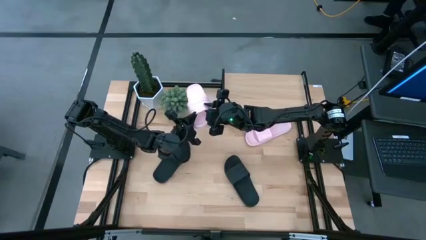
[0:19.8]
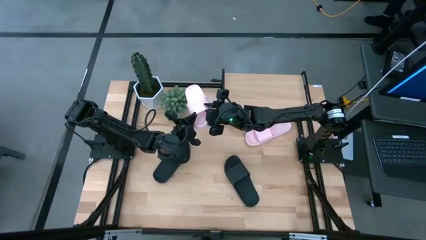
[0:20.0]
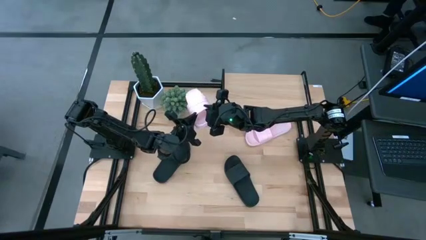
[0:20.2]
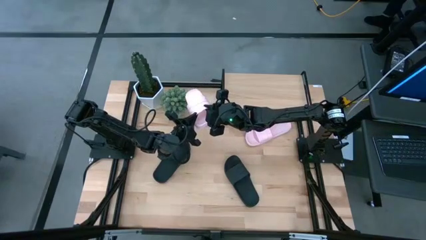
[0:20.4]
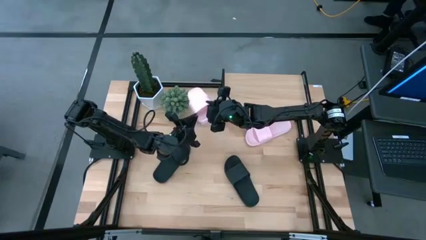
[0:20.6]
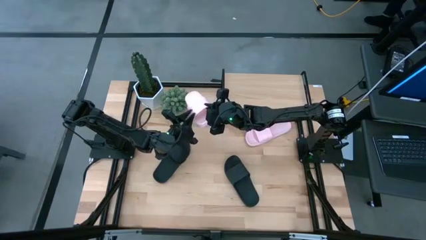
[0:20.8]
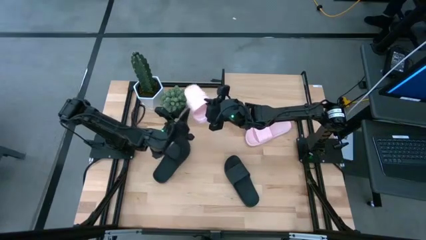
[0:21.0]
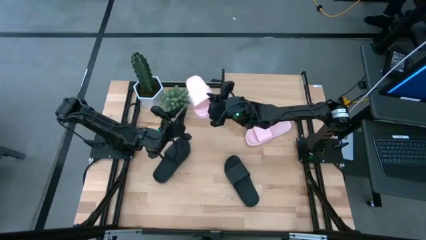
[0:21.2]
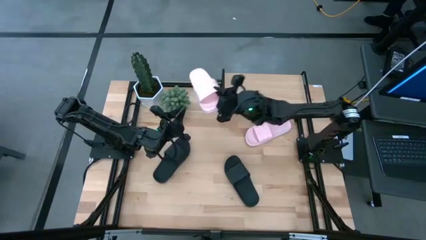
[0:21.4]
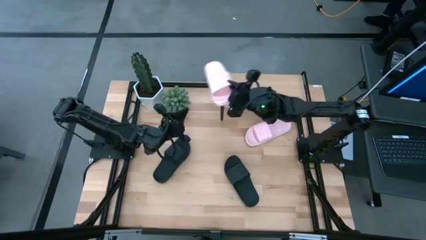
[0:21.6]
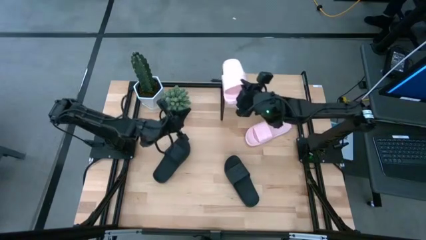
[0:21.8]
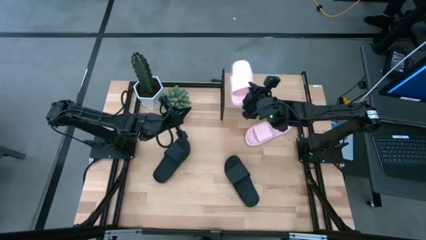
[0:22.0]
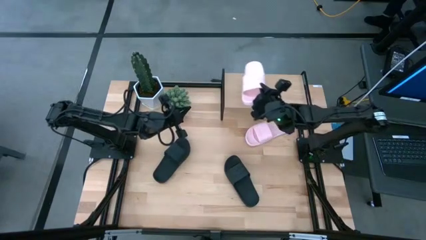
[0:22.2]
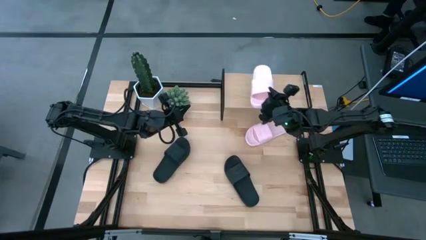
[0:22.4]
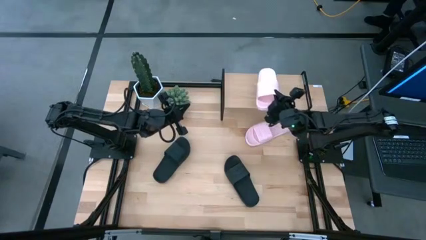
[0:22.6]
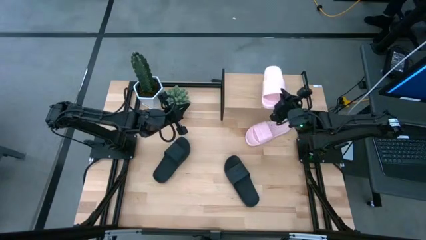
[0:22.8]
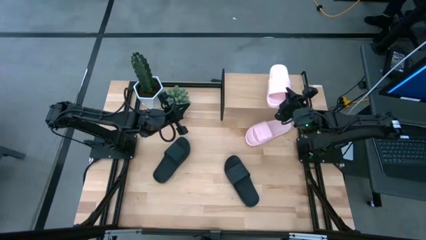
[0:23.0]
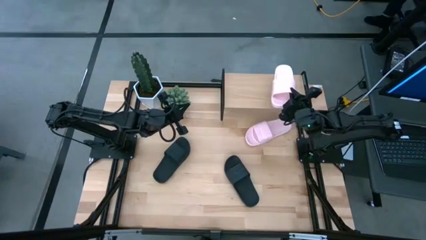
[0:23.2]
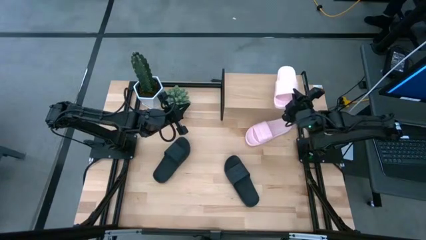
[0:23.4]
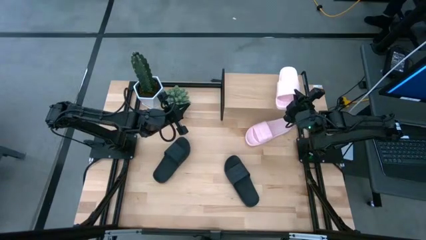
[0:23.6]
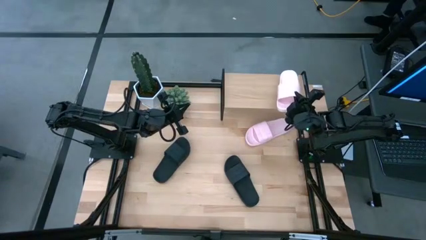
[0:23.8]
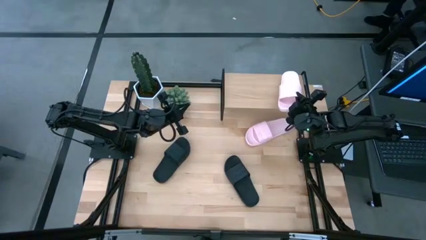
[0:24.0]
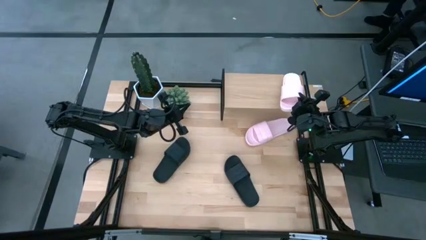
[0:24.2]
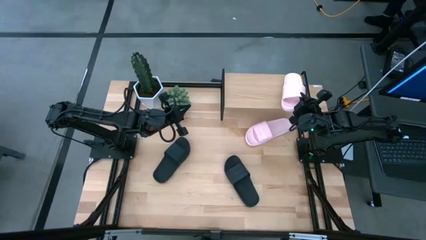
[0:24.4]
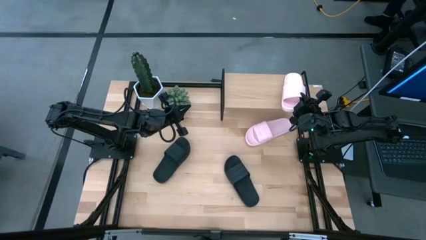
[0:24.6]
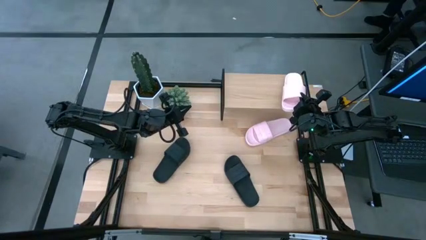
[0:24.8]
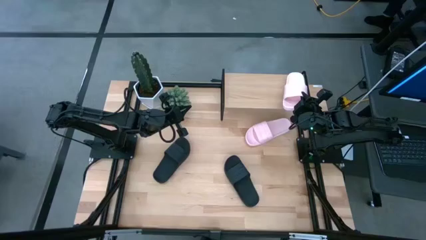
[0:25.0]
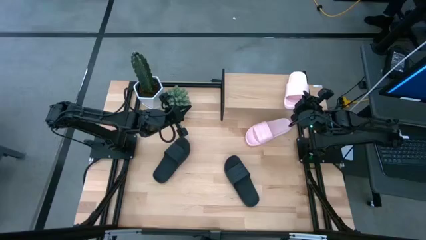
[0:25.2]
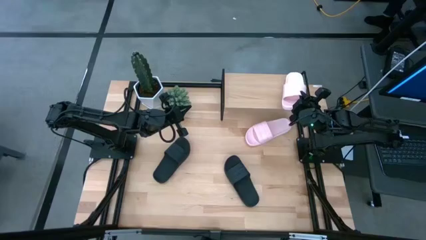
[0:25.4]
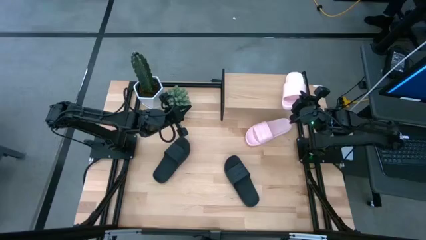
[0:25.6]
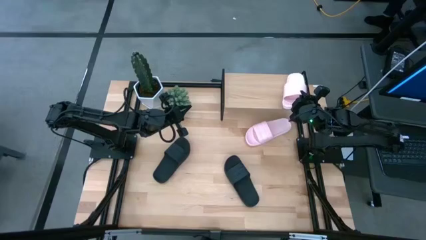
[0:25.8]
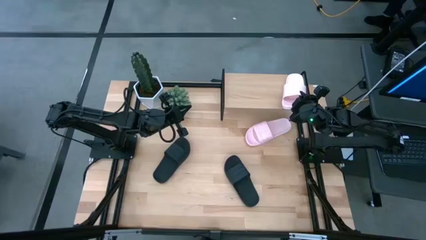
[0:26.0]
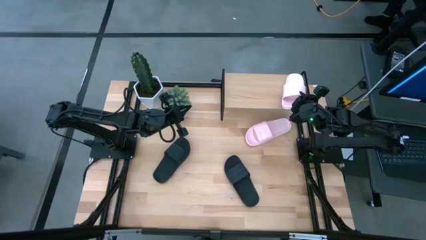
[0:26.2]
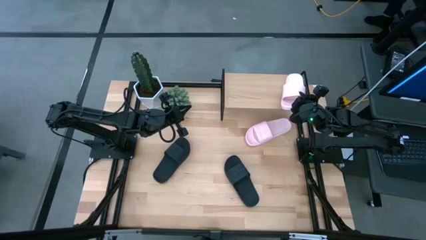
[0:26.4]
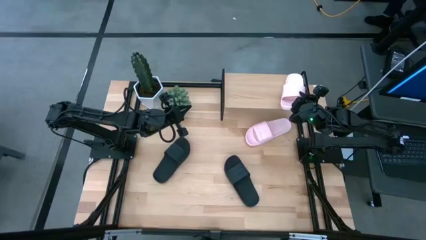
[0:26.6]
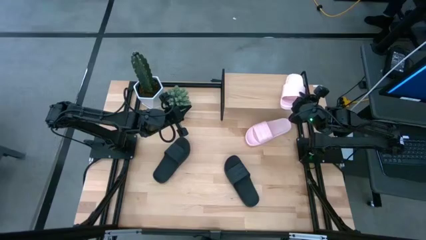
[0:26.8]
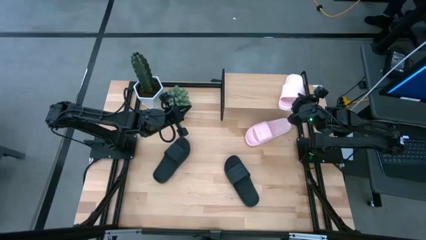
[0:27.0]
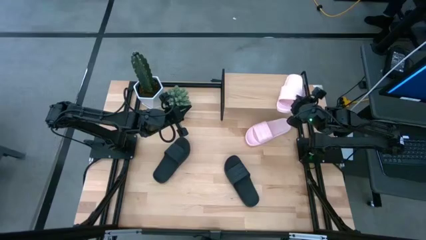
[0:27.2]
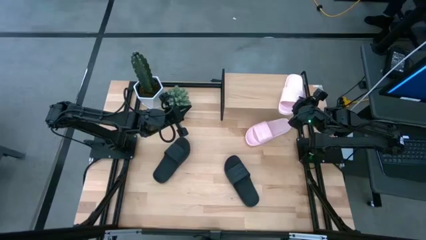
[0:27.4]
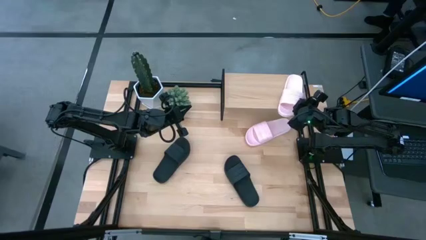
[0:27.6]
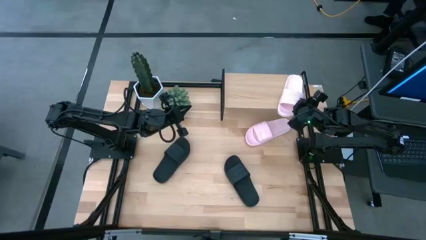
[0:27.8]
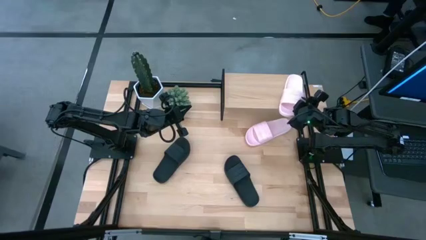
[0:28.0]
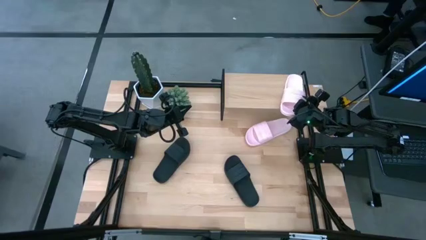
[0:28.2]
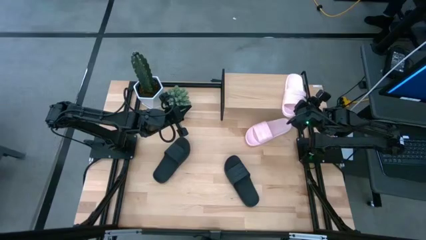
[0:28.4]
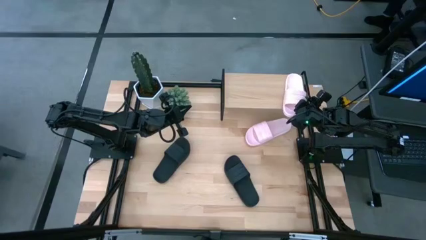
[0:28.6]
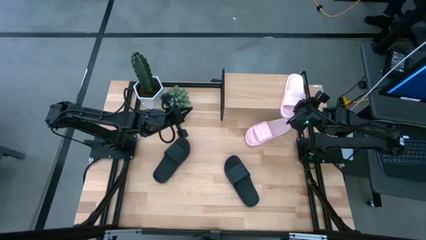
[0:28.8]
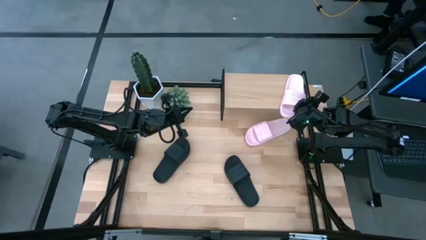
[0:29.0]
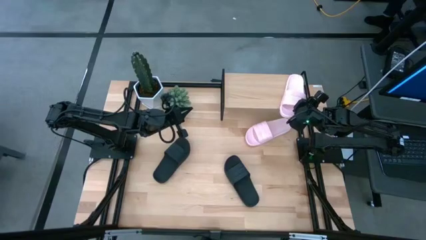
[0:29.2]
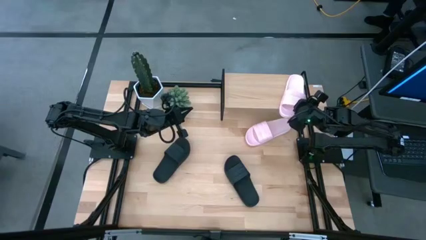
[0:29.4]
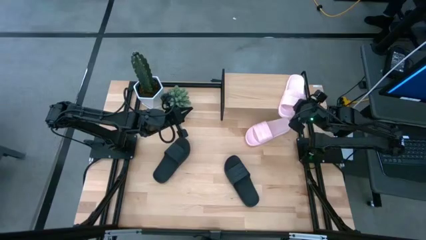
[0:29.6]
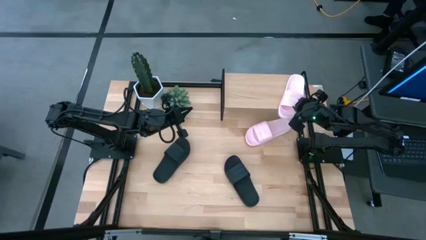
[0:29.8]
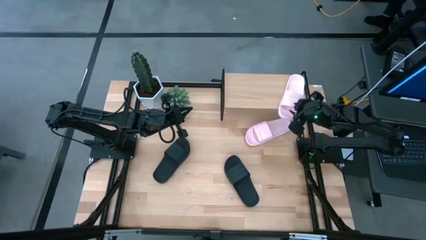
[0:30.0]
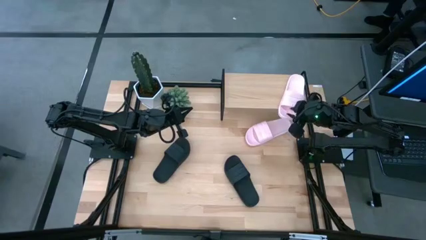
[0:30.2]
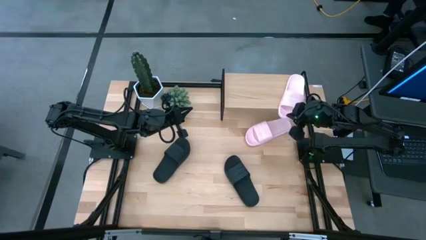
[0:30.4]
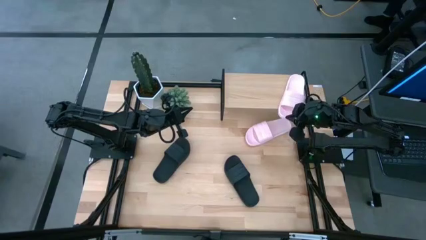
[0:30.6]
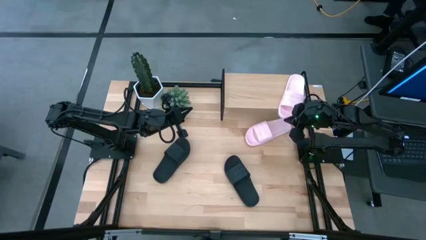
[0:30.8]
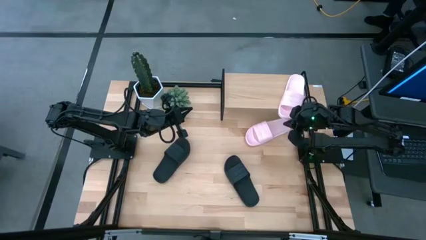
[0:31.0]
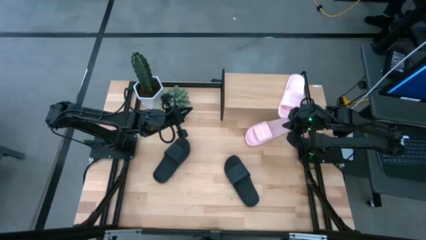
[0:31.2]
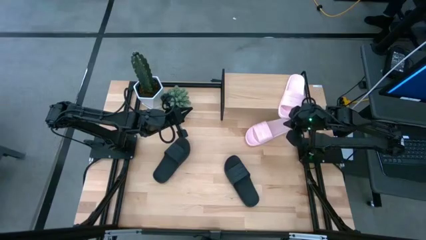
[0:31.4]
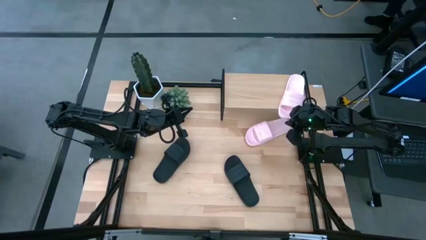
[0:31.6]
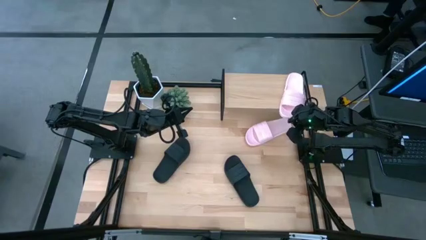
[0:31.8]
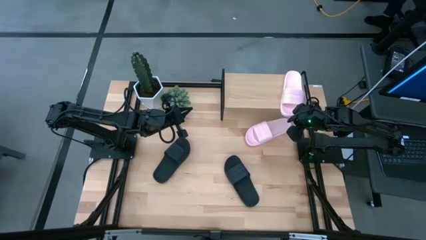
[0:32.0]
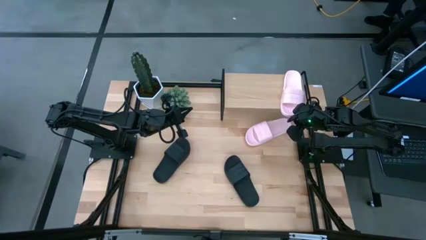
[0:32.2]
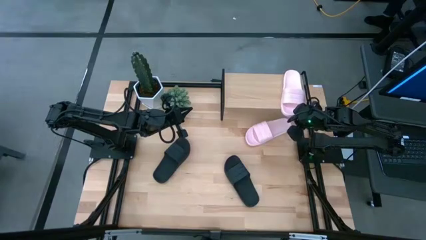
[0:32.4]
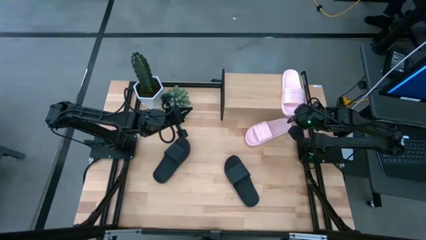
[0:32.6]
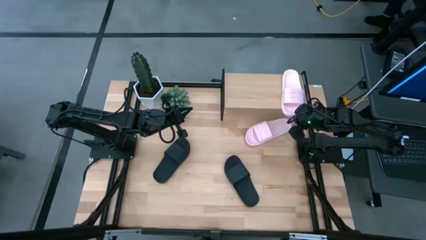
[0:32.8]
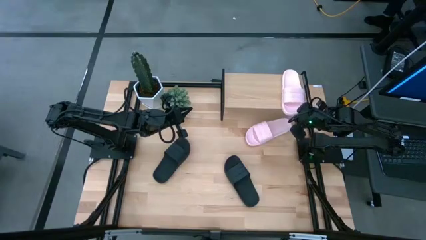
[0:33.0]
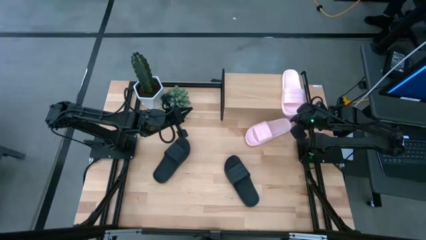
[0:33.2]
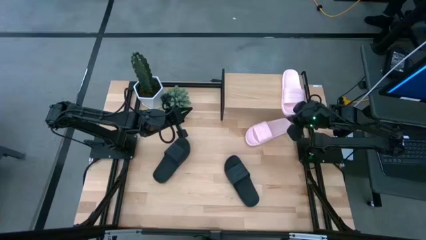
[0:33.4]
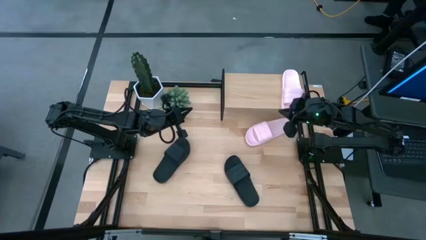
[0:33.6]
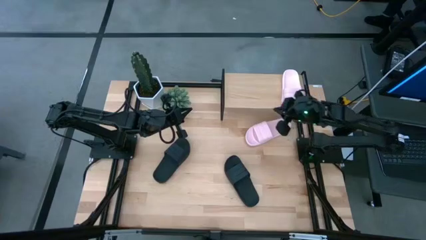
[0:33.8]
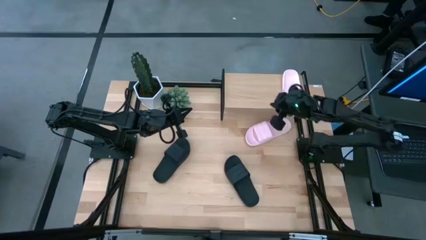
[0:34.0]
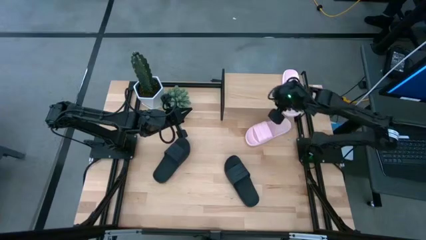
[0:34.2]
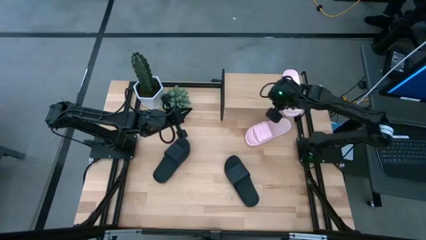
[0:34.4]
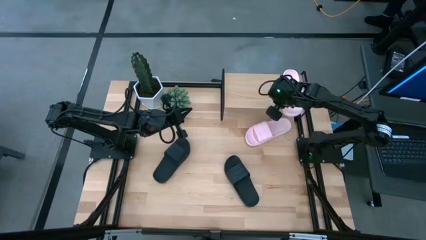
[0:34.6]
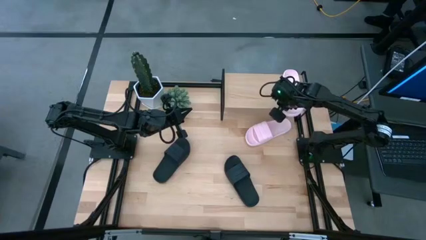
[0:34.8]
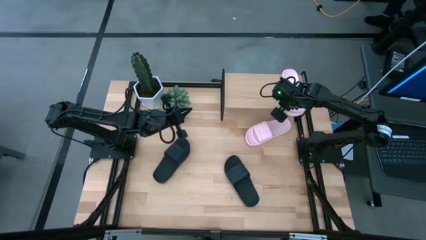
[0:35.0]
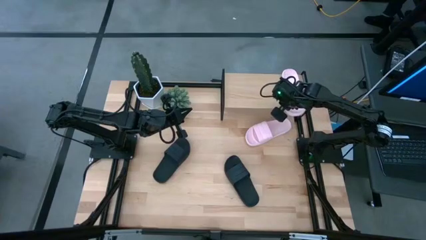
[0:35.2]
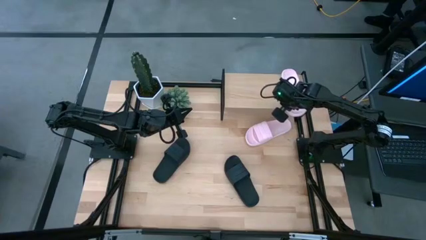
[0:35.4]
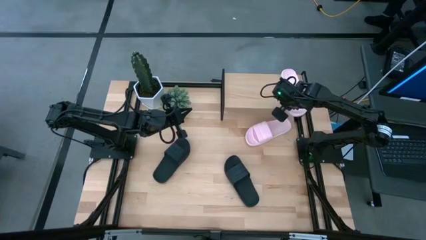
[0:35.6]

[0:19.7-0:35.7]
Task: Pick and place slides into the shelf
Put the left pink slides on the shelf
